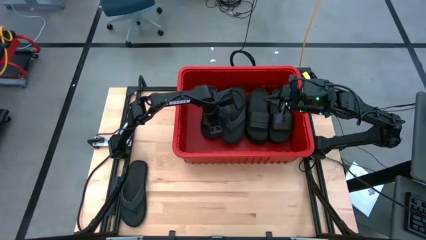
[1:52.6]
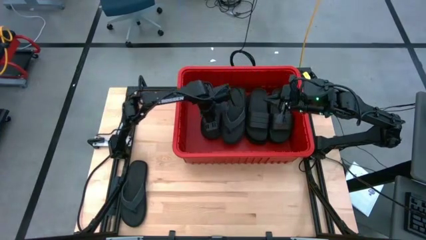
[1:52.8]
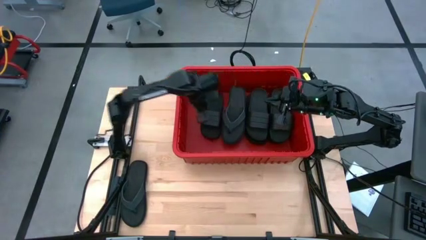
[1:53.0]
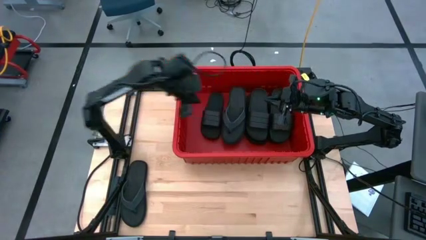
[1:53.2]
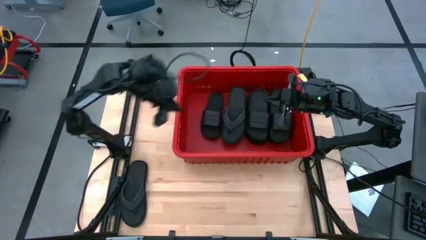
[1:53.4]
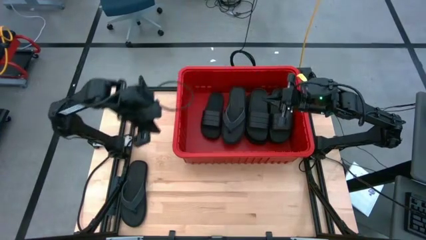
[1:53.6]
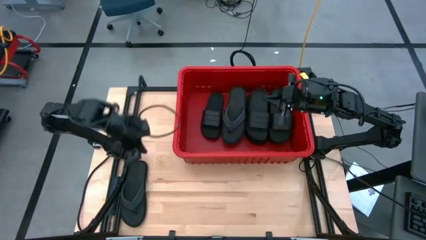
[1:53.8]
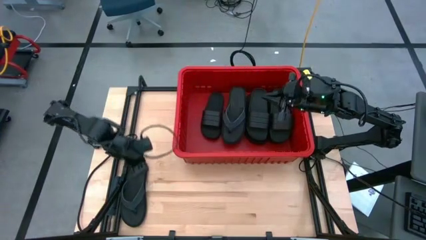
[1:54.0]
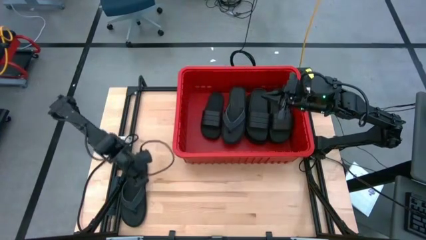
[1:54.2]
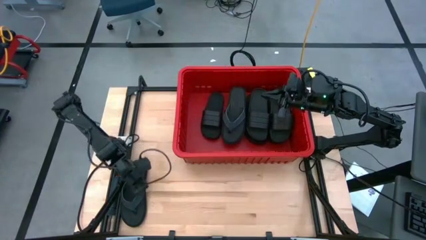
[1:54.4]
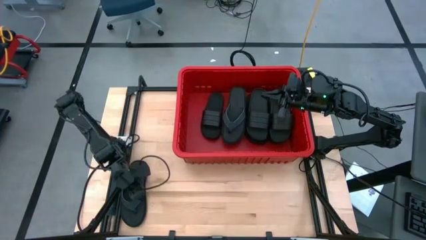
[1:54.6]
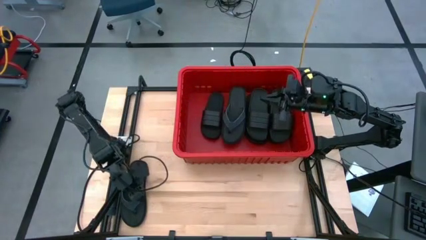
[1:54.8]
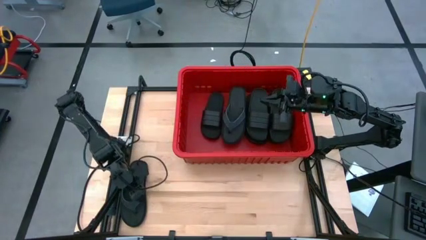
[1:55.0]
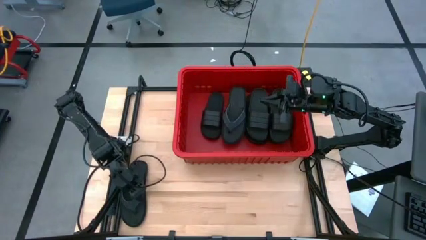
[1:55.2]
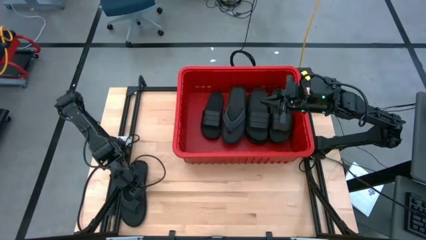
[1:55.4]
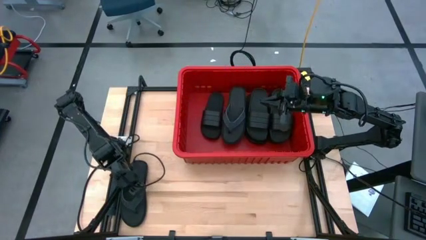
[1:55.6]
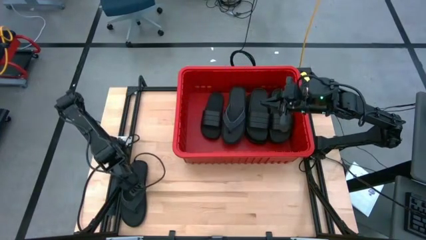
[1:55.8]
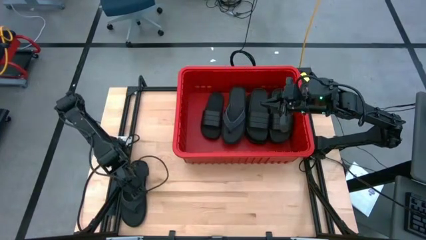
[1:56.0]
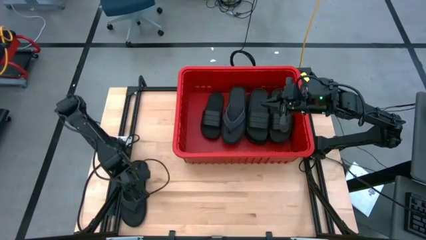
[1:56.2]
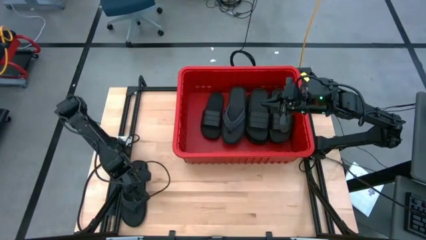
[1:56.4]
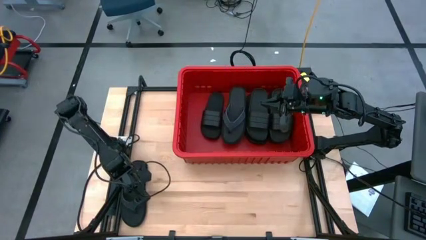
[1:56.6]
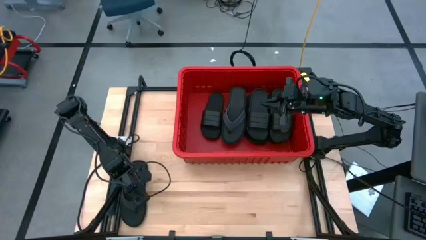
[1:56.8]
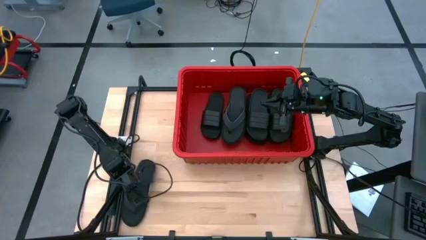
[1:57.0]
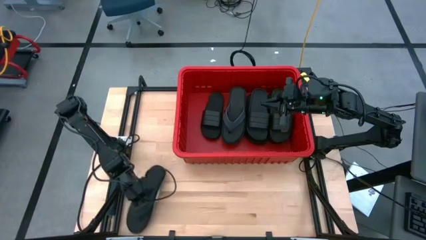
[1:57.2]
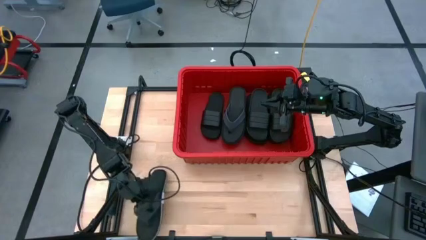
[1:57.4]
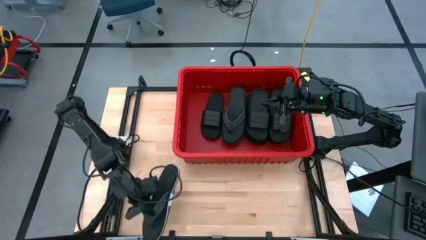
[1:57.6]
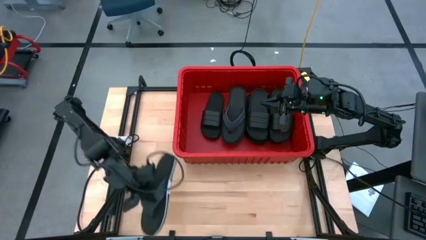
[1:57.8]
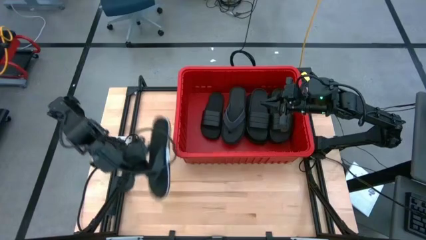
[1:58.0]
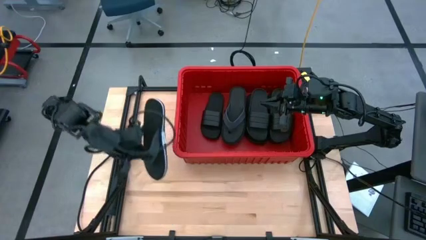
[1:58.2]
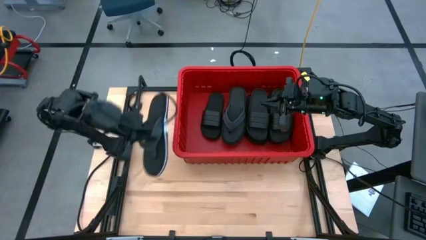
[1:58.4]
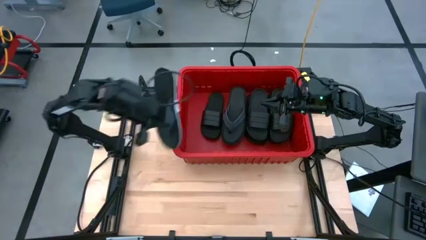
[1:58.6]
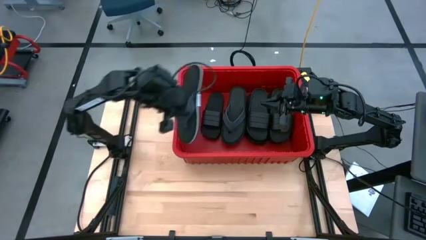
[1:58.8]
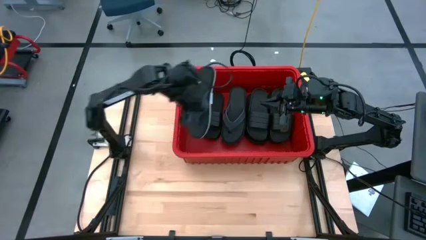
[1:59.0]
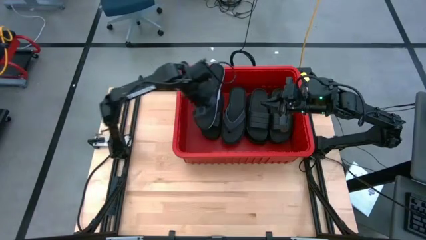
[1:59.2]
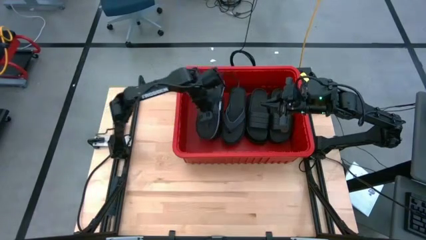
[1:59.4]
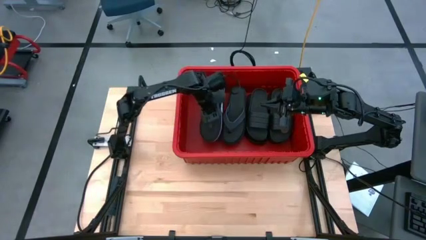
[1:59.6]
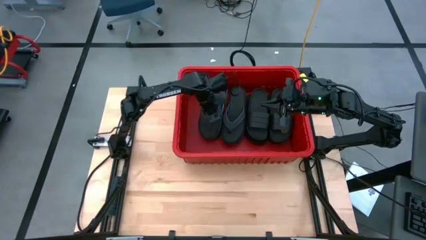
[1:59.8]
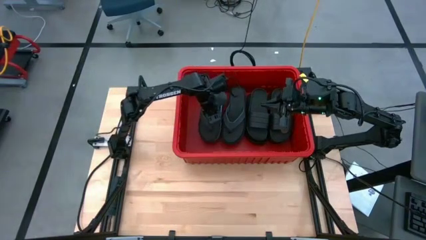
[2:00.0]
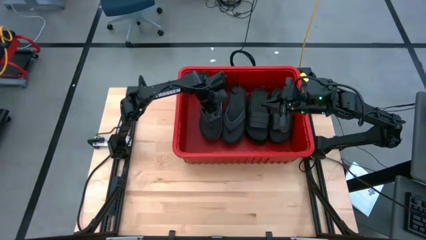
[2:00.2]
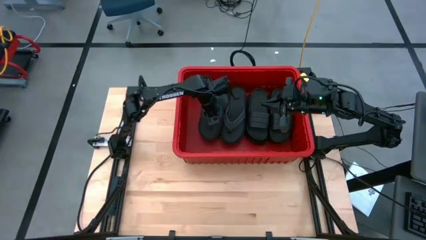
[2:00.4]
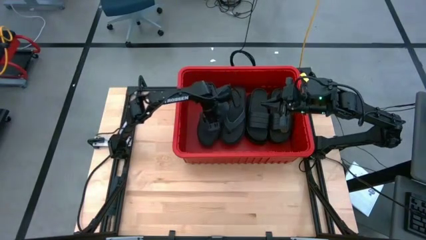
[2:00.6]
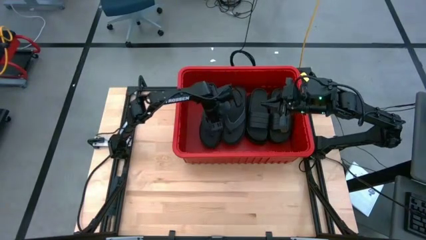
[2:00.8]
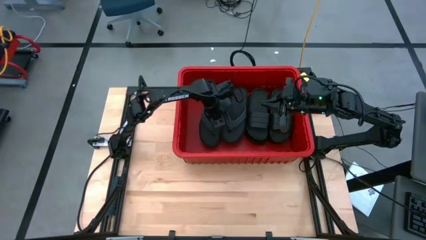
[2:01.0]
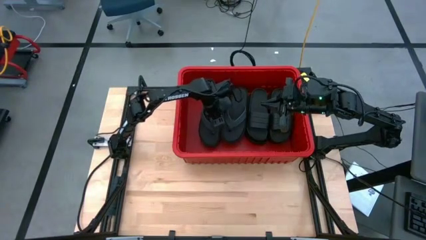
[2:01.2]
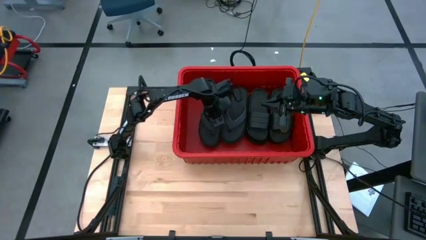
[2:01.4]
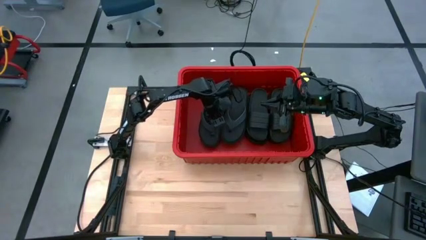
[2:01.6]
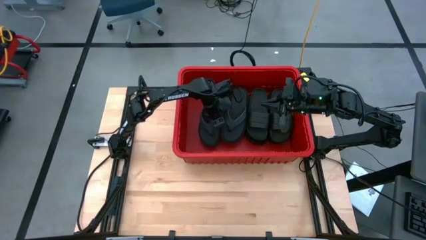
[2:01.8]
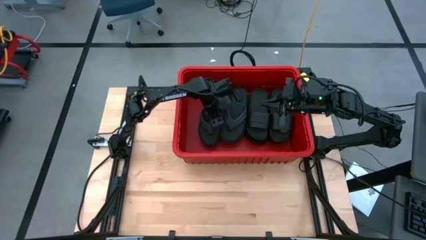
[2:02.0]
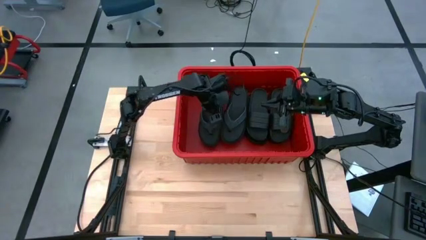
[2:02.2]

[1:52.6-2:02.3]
Task: Pick and place slides into bin
Put the black flip flop on top of the other black slide into the red bin

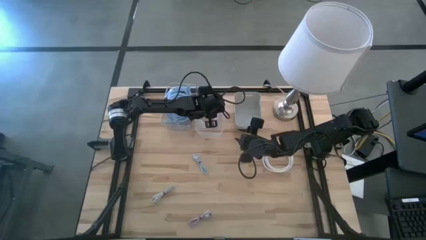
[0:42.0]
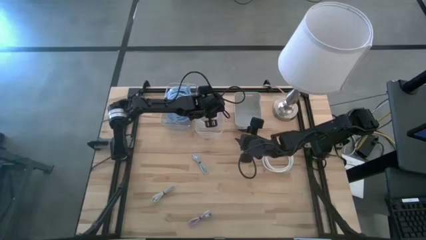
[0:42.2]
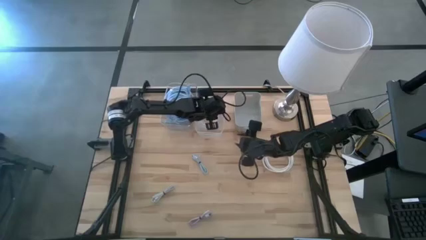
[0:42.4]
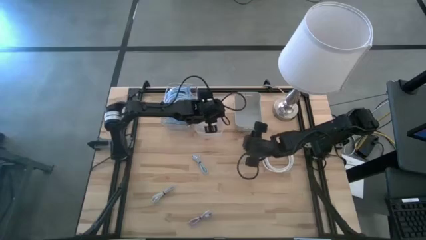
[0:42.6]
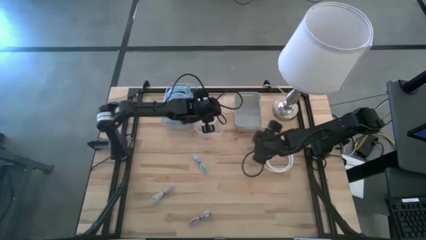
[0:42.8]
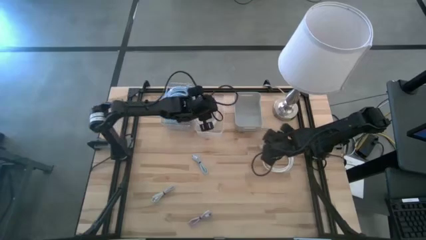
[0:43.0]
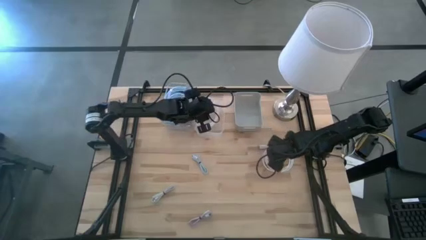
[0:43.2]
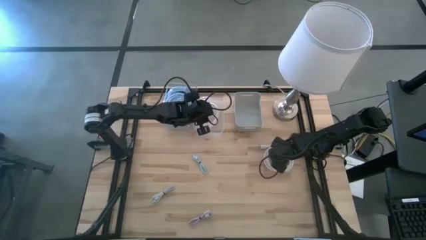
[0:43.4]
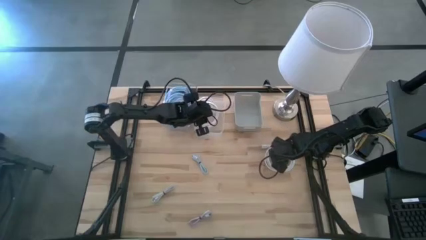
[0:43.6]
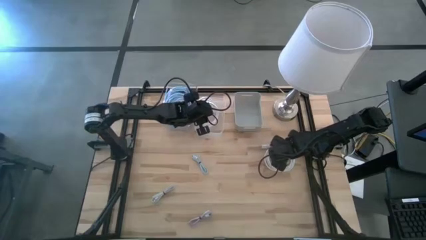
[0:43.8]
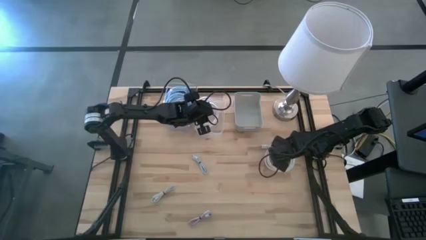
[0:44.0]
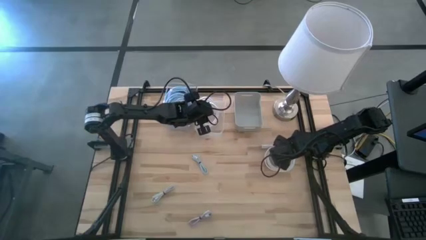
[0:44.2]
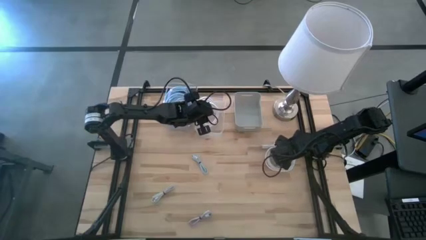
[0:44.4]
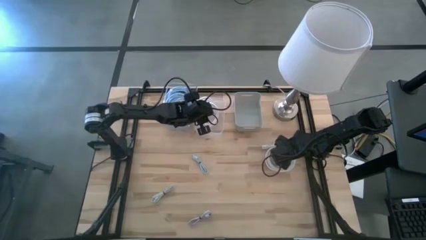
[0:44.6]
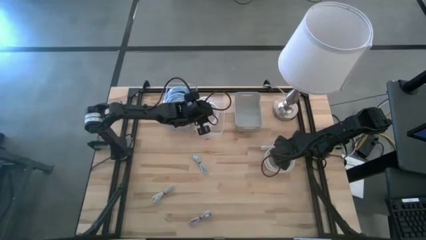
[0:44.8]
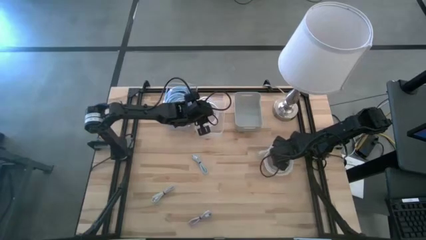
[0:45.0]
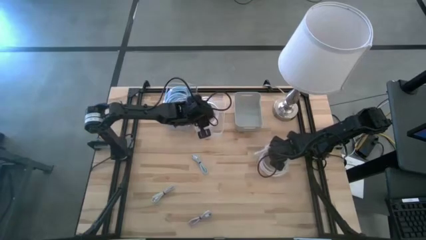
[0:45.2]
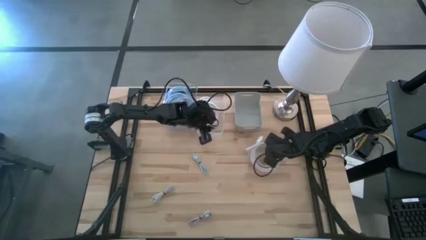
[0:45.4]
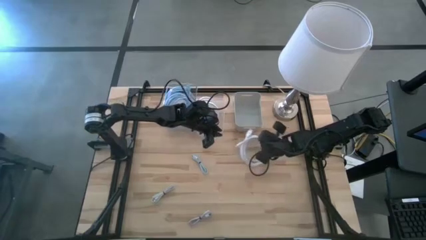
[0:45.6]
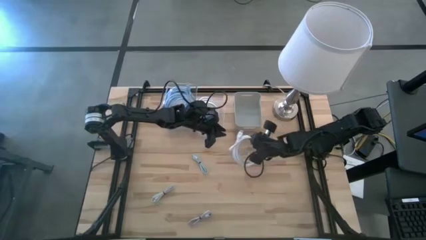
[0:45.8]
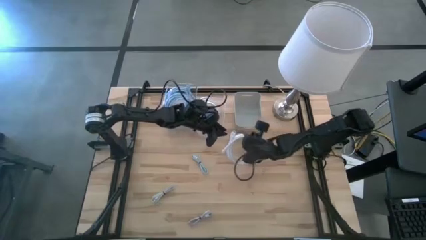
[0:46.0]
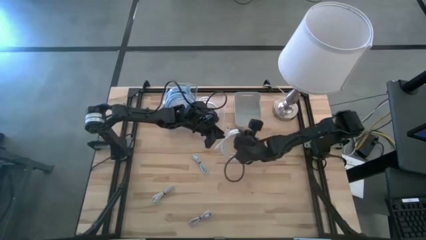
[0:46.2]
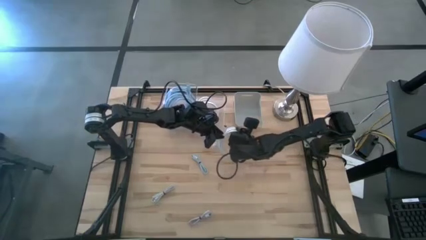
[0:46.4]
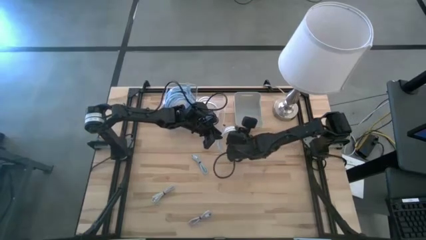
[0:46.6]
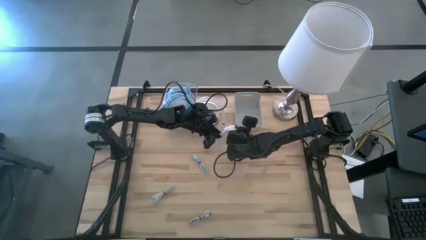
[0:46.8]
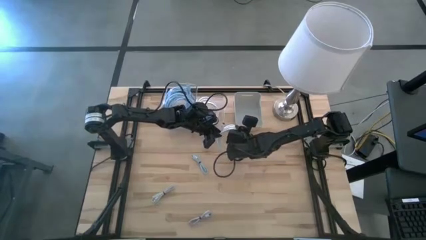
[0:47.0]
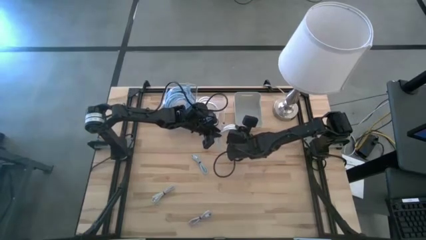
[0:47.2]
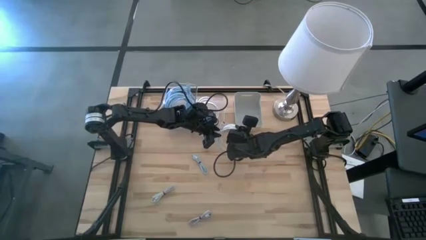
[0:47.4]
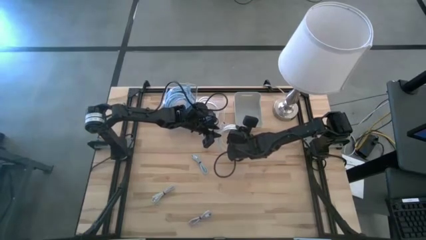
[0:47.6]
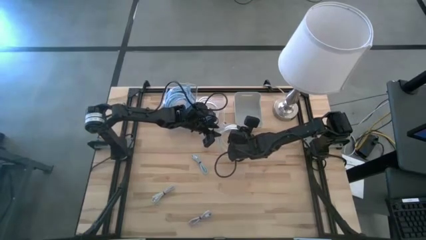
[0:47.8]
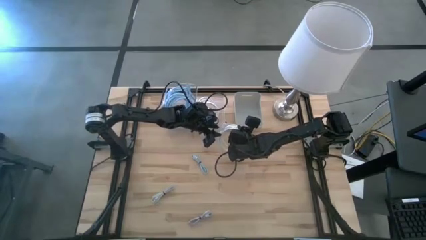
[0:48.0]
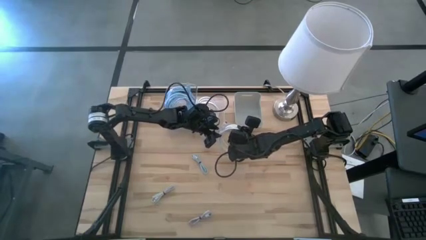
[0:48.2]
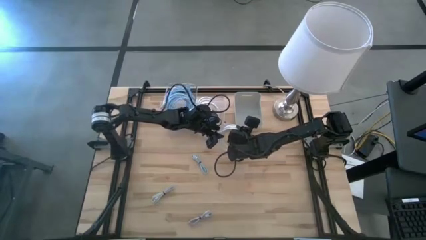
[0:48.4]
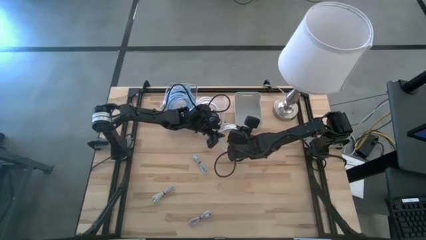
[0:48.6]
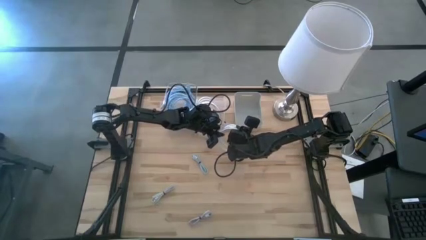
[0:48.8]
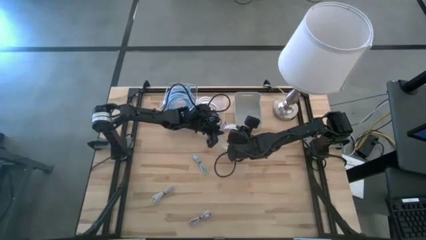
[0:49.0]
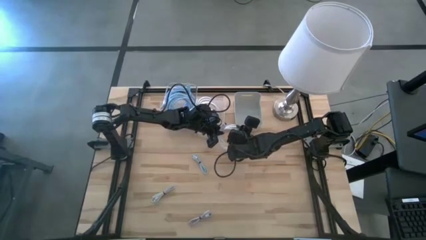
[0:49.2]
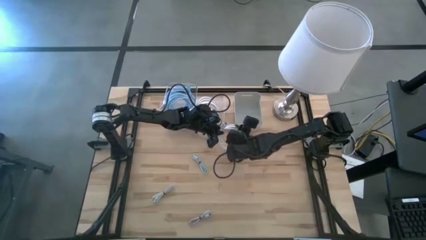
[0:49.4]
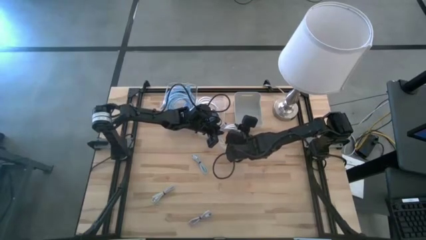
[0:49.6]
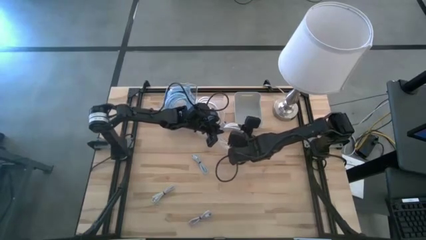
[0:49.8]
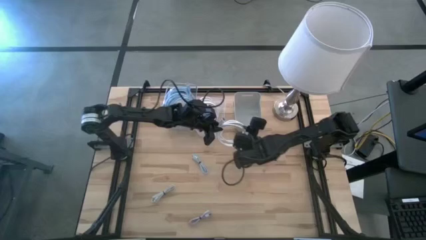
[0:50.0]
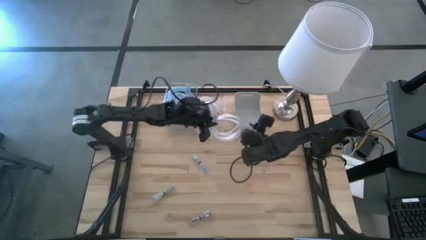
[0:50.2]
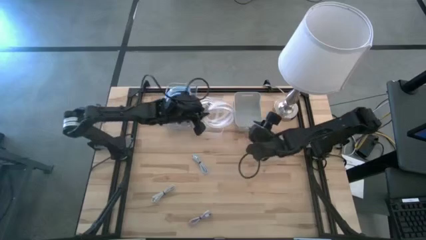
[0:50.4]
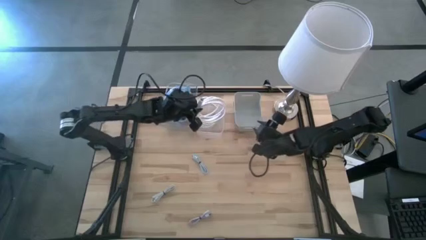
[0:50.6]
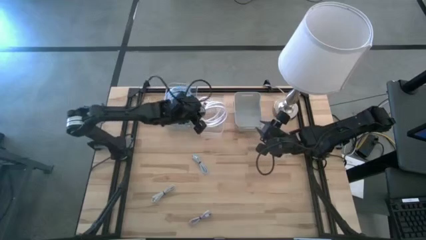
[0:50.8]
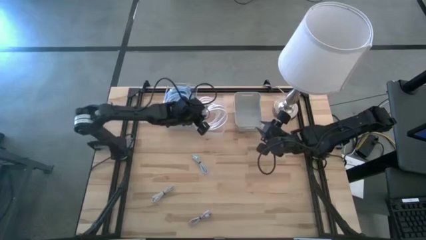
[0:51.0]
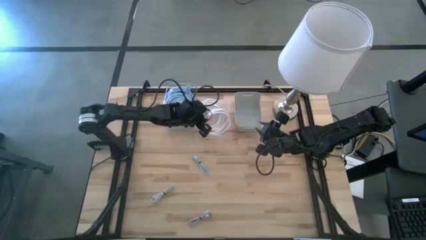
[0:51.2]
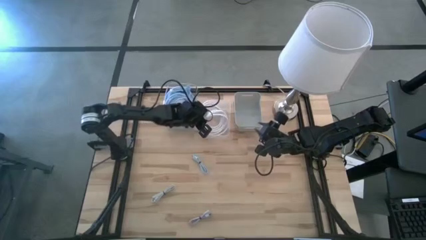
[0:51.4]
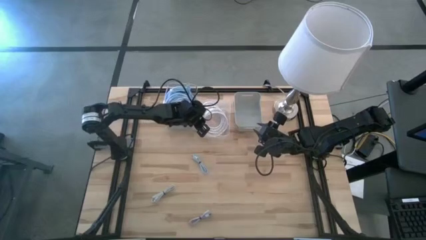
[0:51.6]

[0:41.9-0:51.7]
Task: Pick & Place USB Port
Put the white hdmi cable into the right transparent bin
